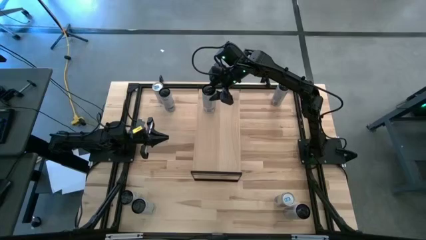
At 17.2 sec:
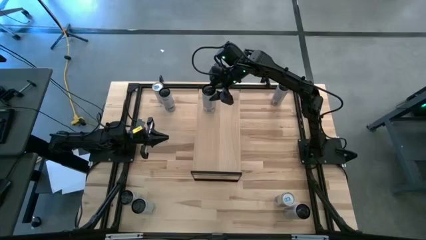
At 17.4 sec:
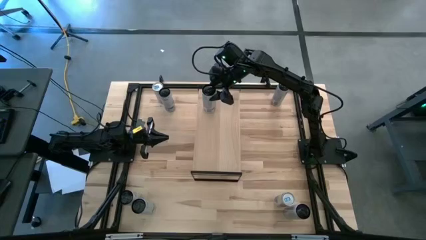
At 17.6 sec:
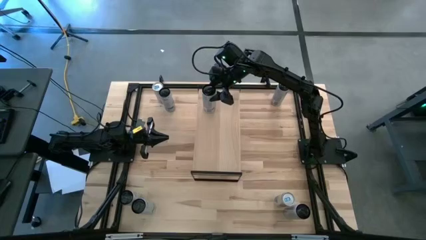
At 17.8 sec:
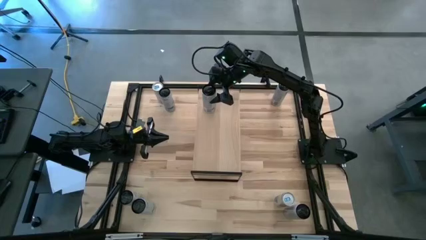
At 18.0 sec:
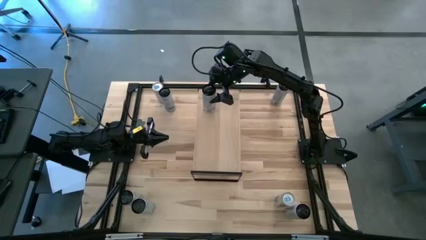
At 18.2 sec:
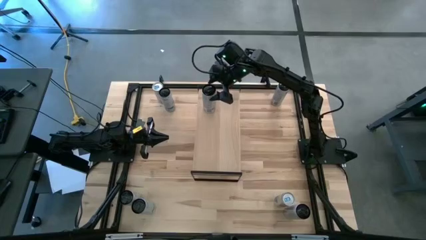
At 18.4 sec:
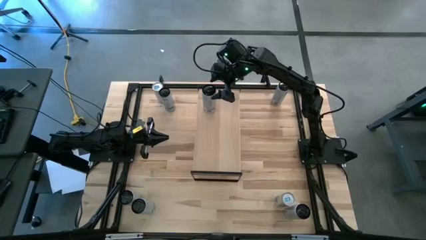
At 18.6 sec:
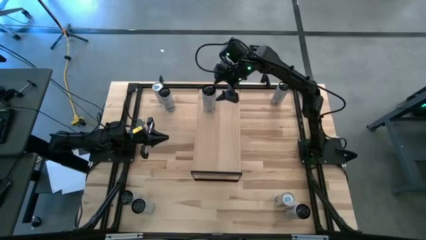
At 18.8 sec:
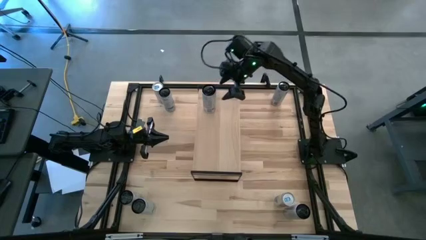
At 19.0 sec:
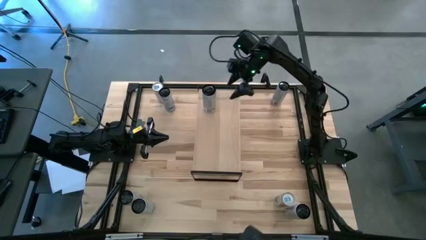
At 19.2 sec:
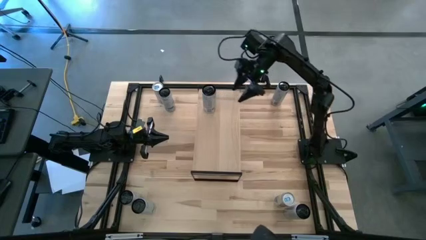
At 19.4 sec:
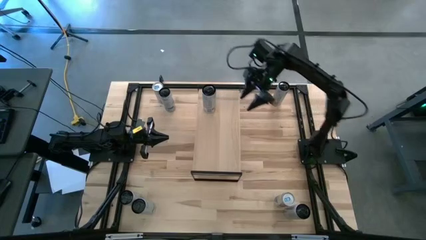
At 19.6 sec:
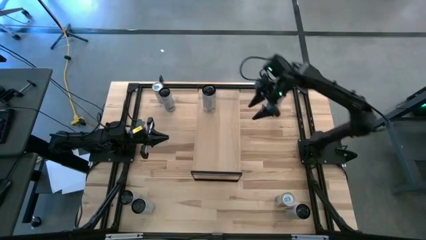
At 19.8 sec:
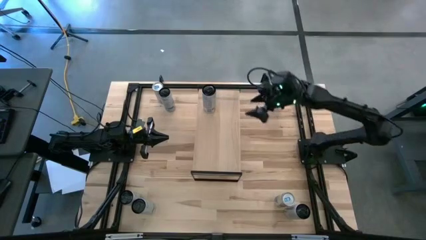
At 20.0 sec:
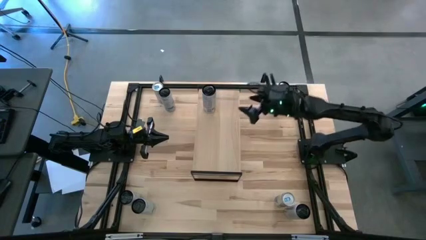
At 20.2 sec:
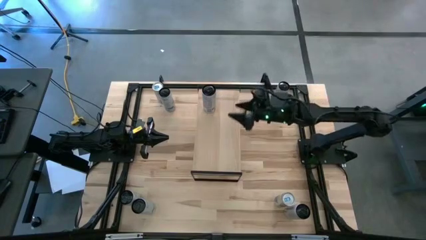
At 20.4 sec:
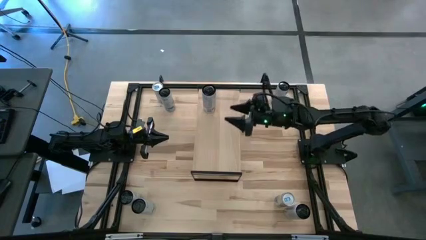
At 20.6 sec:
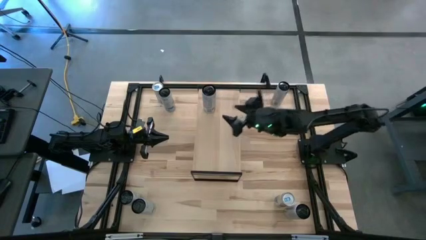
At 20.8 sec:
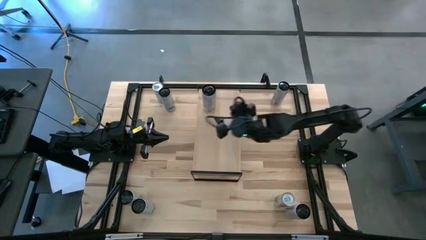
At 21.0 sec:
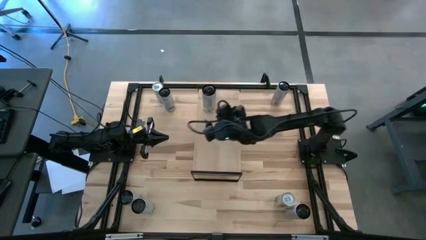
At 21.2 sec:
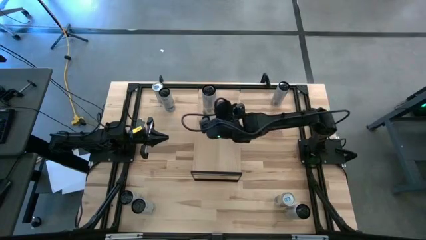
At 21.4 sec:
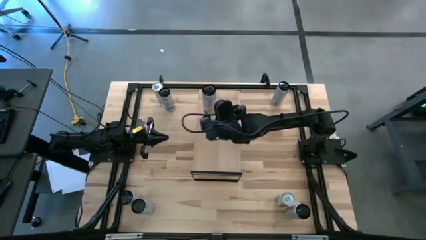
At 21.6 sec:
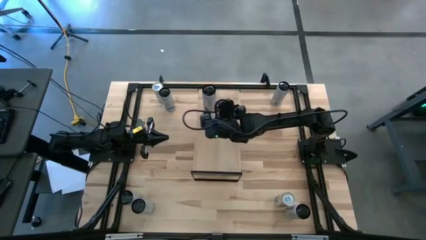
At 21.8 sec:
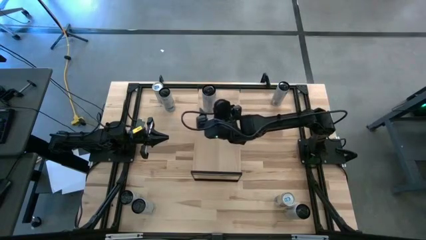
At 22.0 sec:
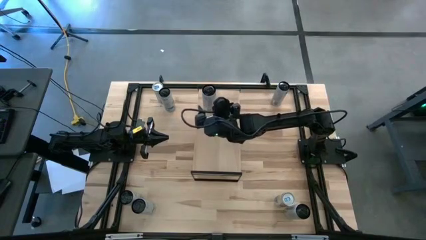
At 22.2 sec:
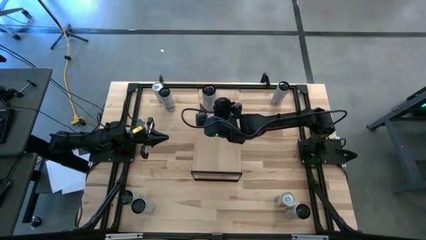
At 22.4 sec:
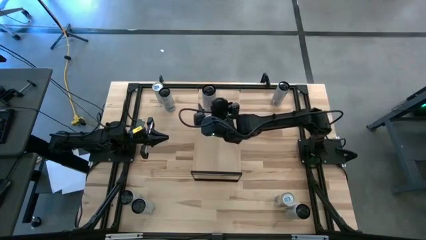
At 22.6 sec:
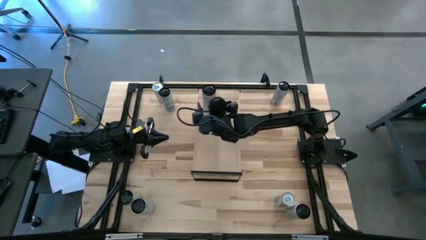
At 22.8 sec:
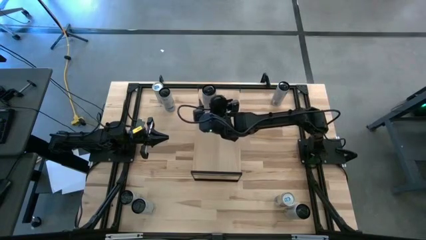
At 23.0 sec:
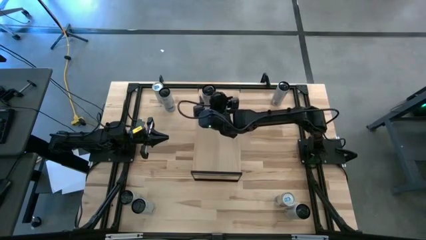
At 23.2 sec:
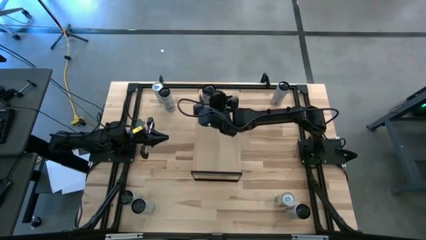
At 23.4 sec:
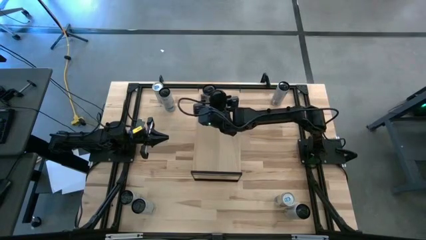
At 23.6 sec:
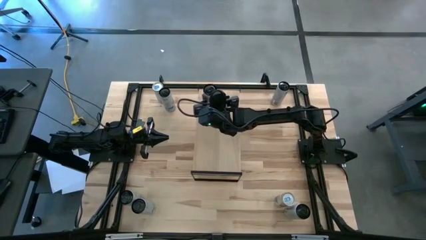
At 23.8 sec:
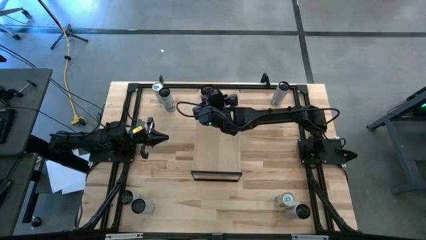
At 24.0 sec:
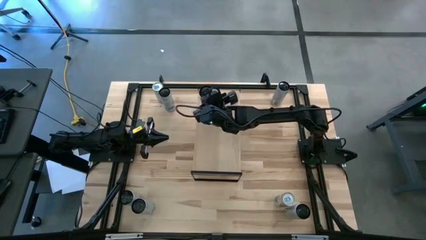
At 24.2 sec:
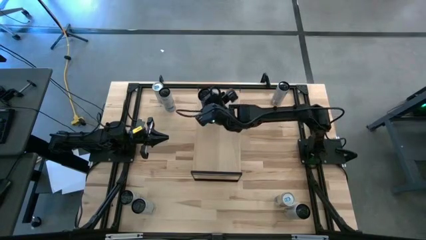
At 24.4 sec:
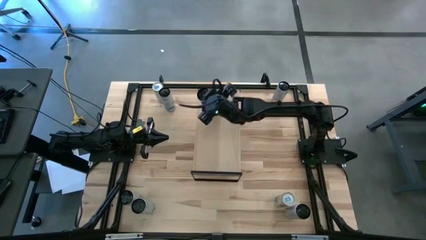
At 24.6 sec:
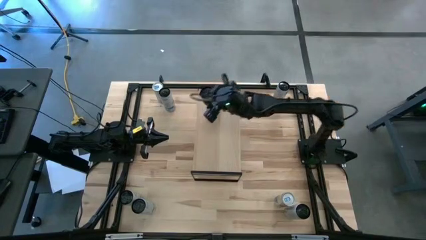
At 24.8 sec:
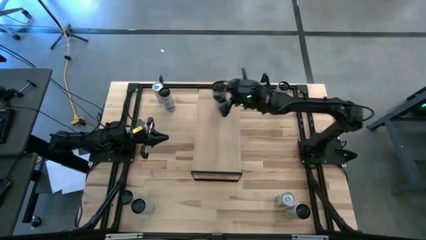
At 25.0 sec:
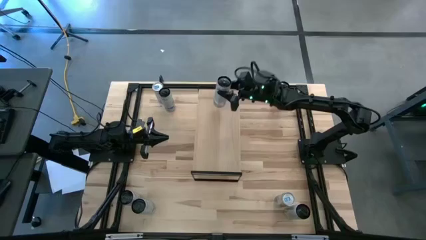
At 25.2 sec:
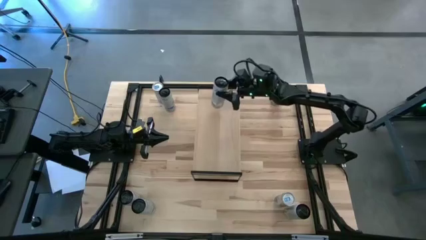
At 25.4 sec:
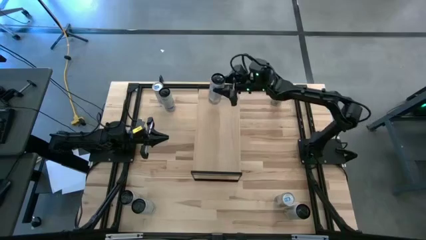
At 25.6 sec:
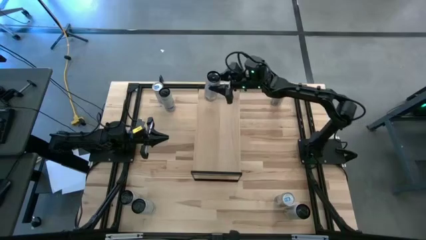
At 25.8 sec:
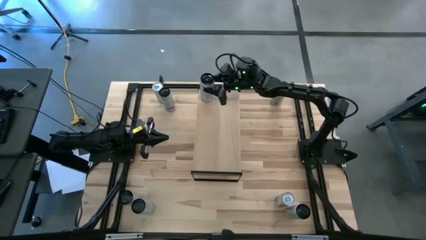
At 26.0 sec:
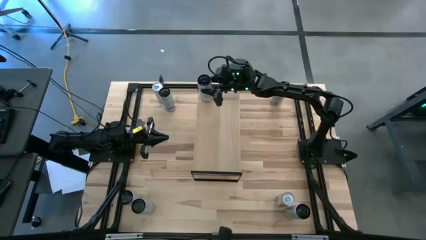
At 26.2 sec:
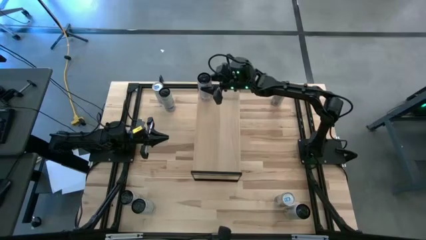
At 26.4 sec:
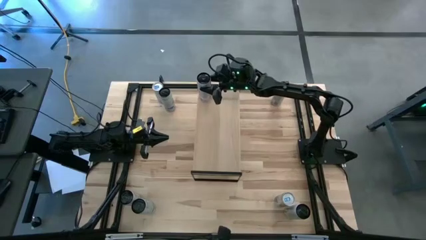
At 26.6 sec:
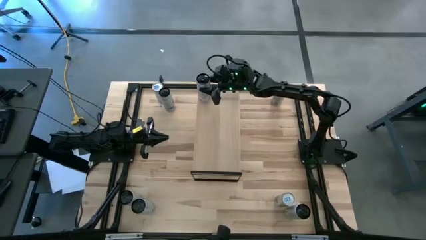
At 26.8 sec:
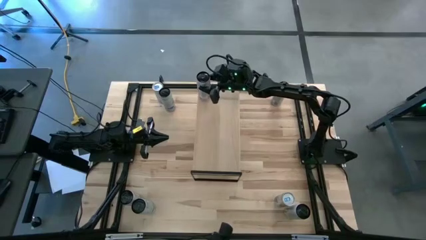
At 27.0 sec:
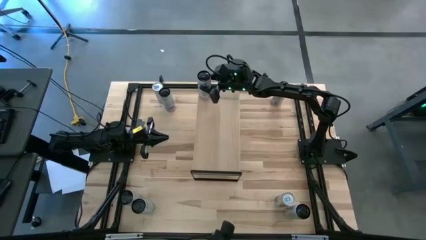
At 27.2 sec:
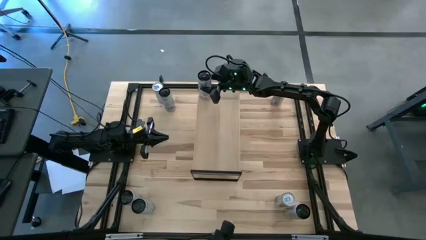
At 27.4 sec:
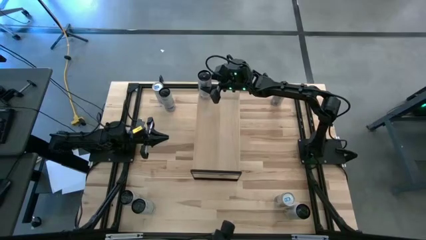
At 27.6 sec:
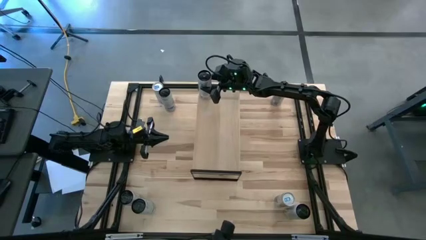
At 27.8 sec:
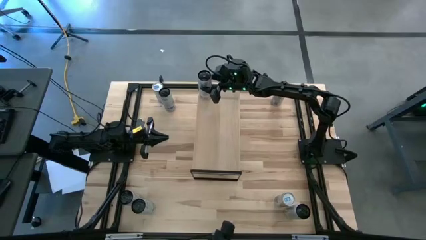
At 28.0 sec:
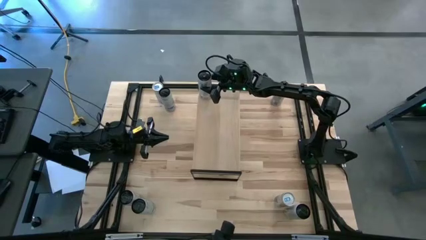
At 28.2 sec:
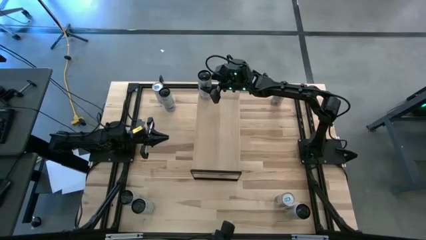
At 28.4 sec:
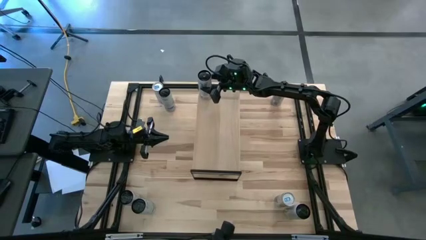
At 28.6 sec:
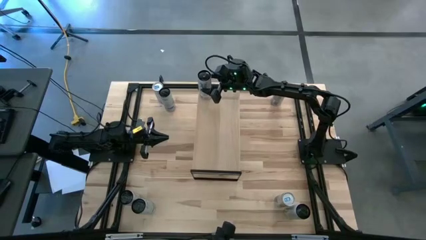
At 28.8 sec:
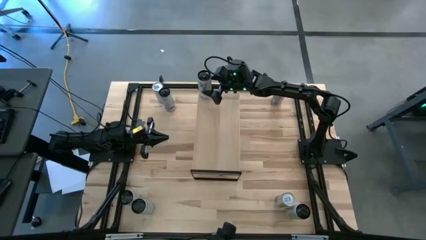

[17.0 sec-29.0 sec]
Task: Place canned beverage on shelf
Put the top white pink soda can on the shelf
